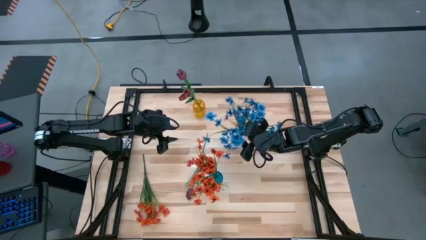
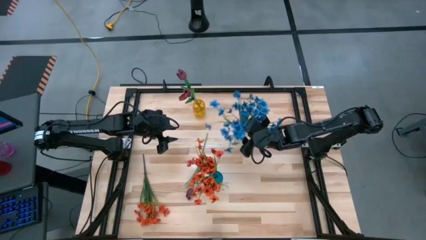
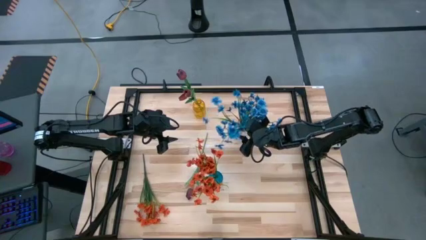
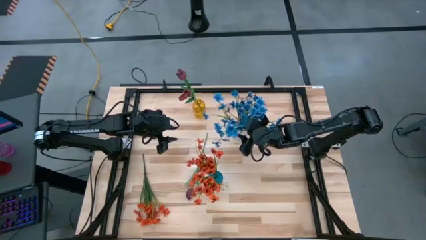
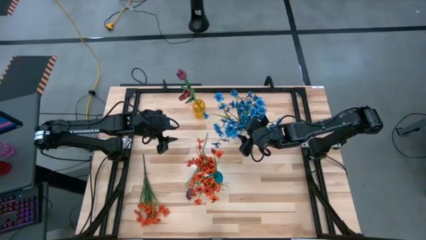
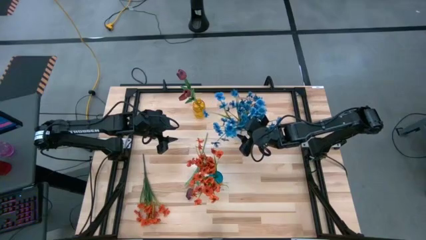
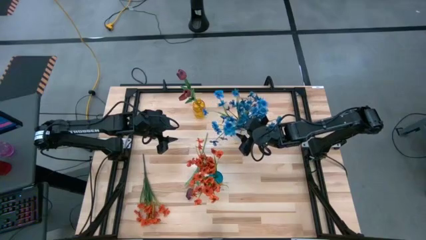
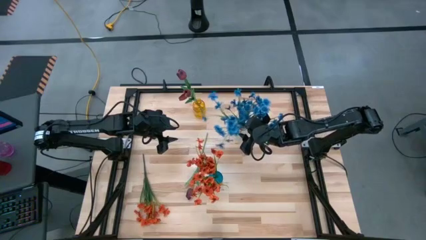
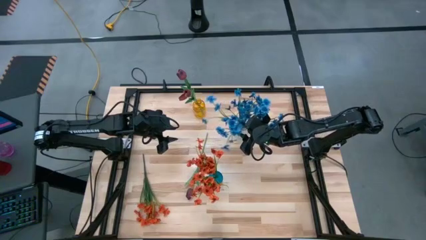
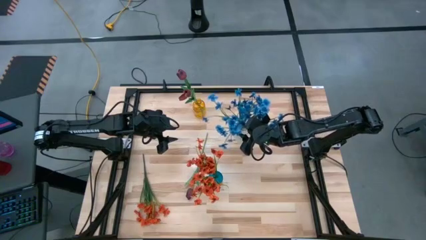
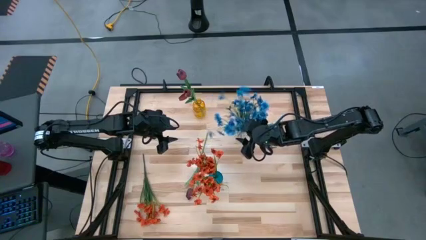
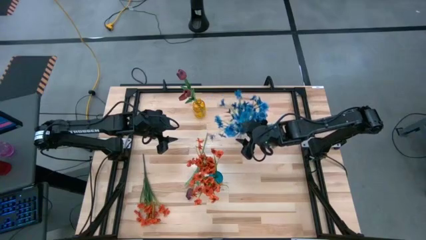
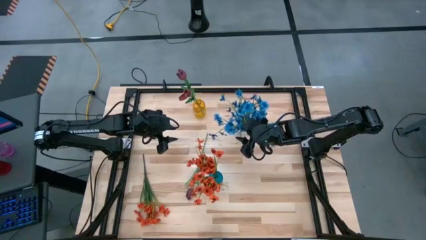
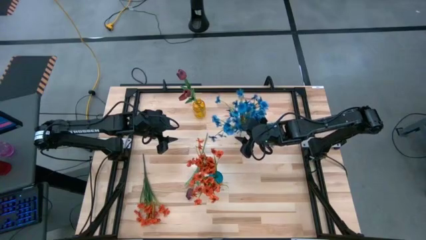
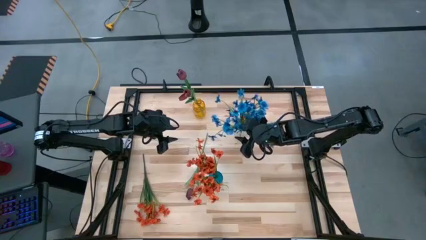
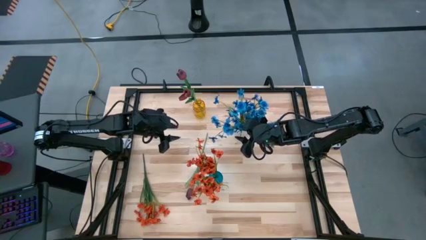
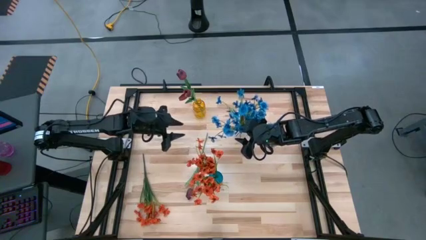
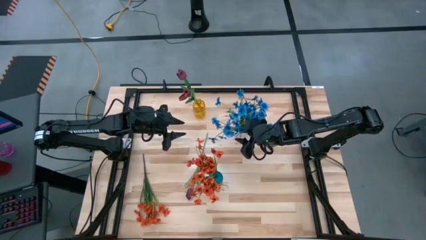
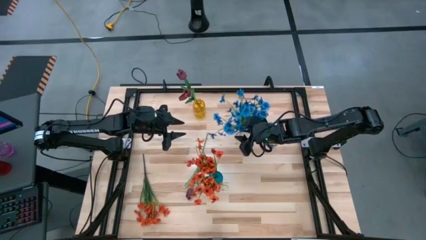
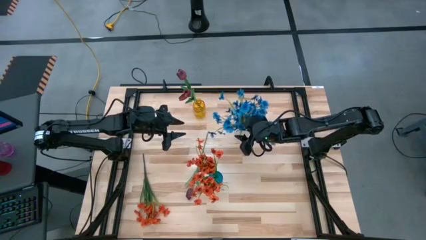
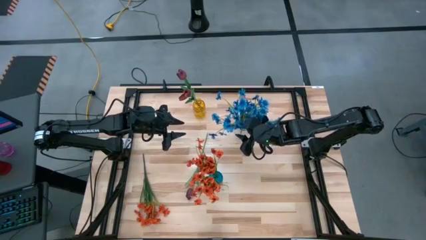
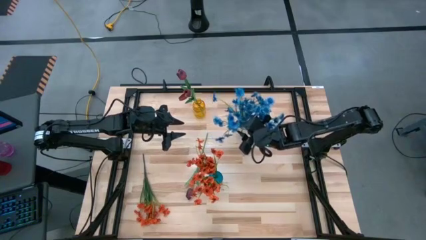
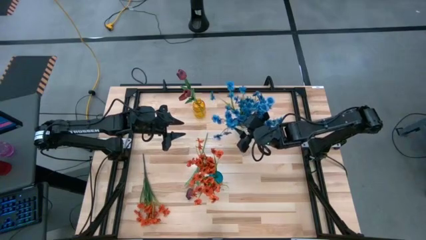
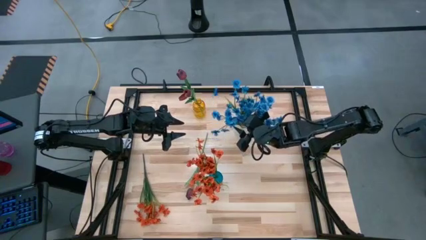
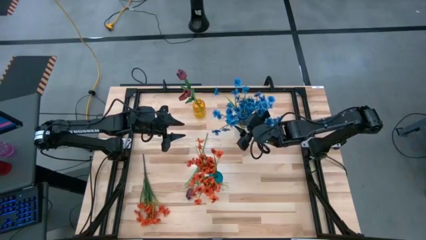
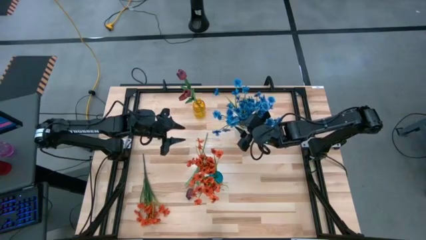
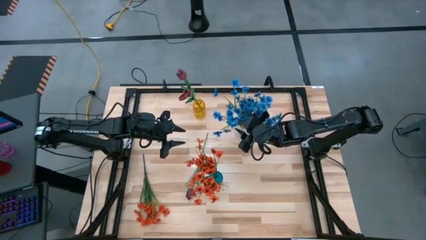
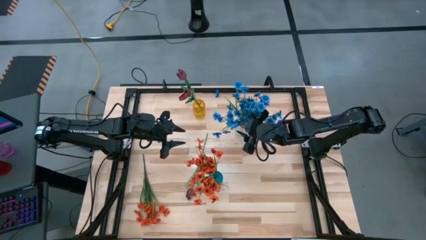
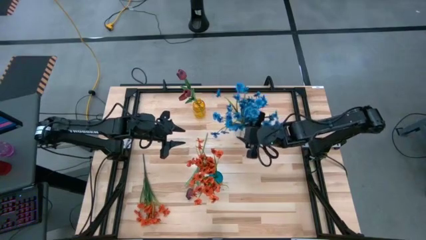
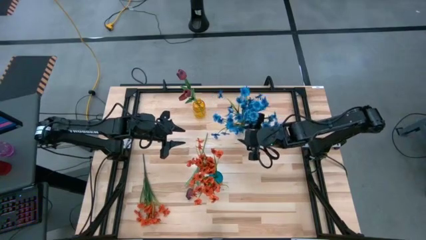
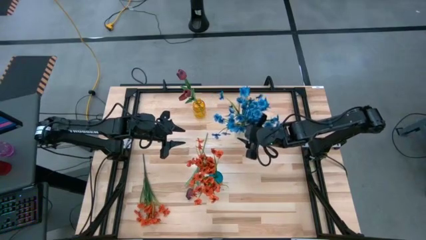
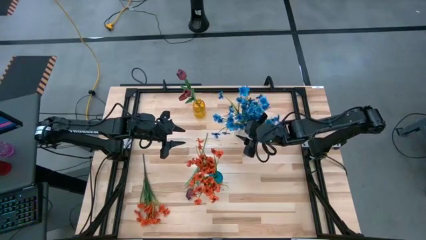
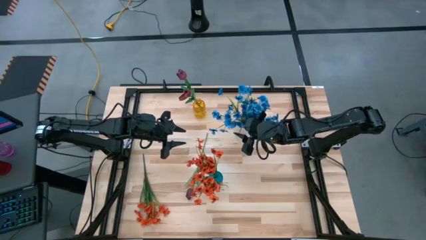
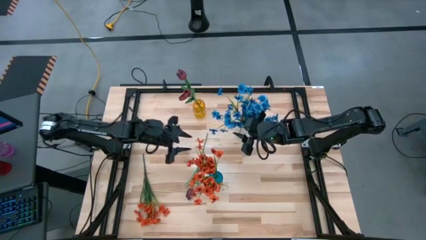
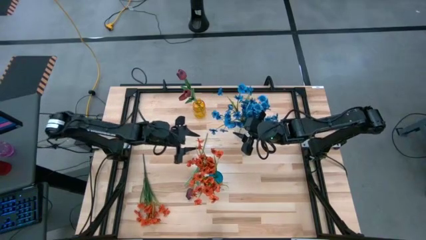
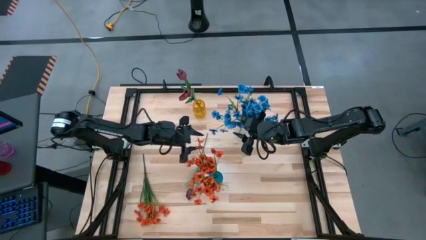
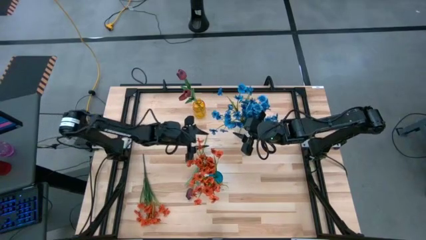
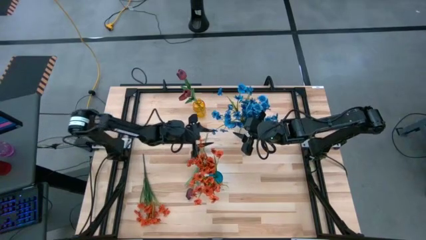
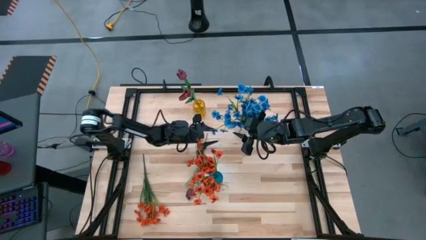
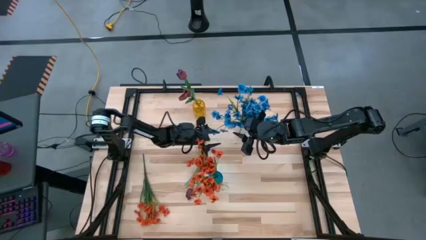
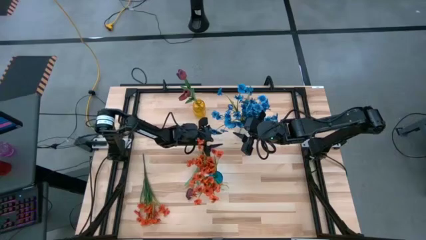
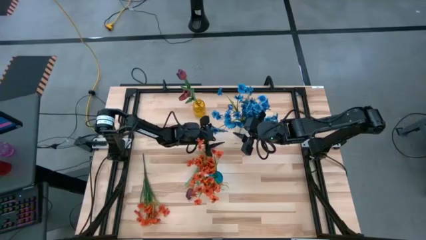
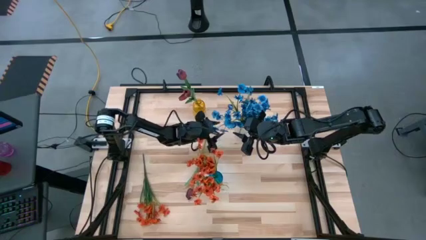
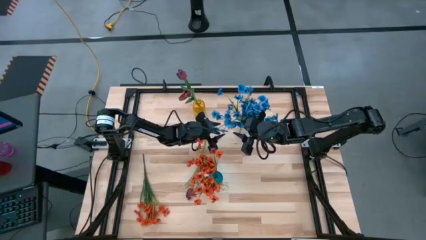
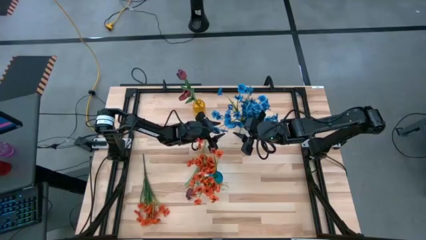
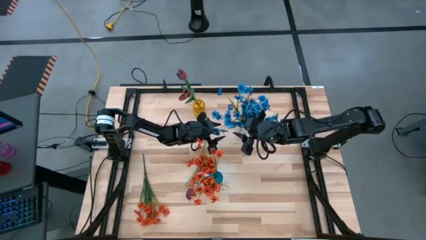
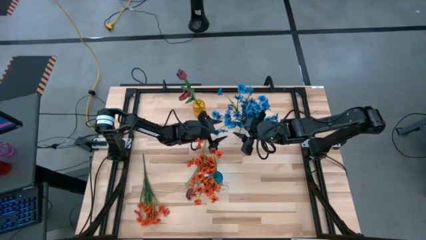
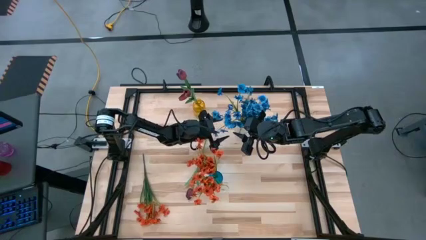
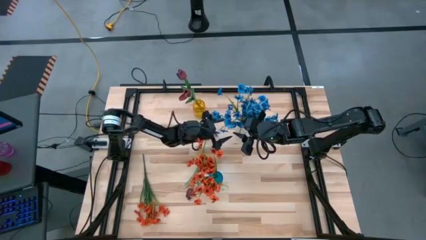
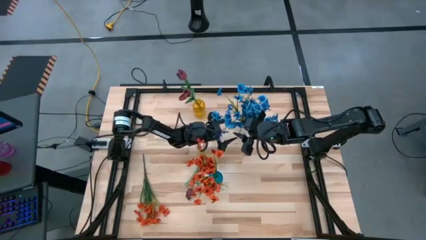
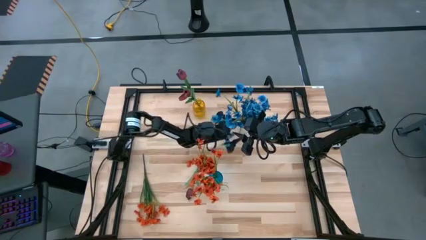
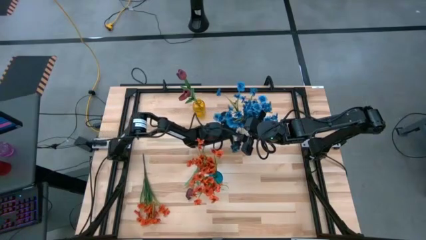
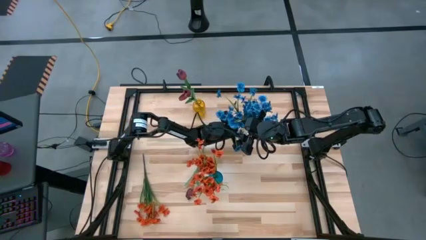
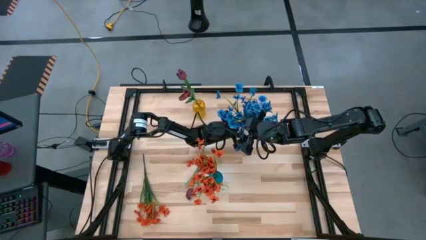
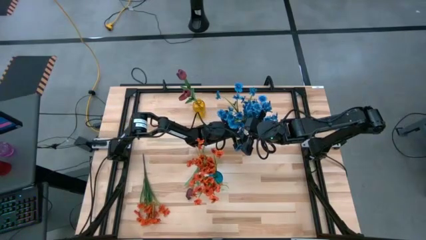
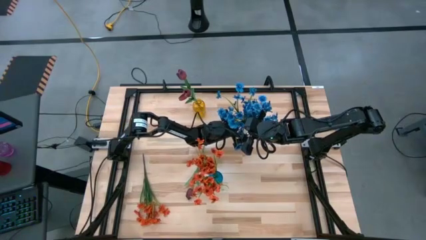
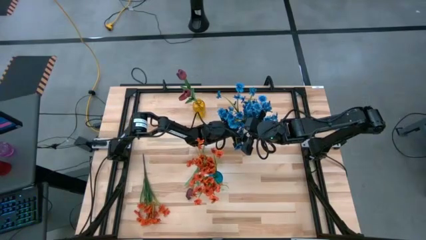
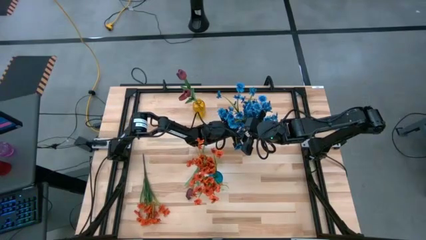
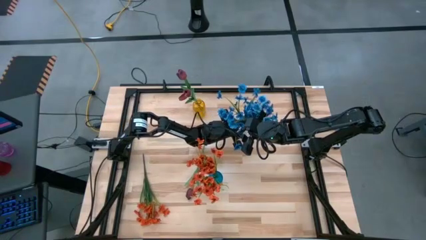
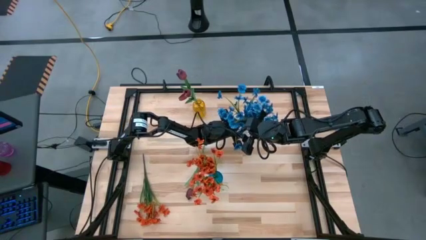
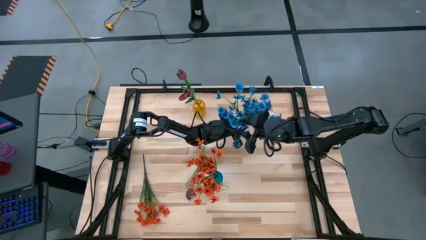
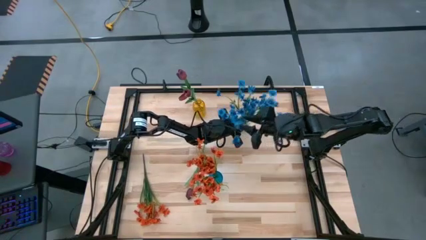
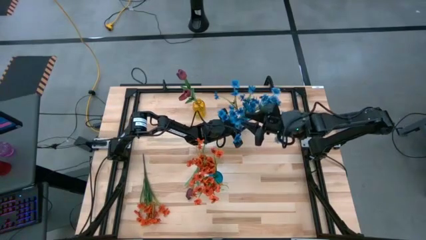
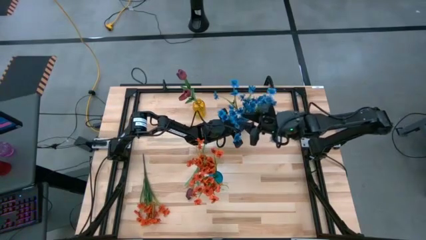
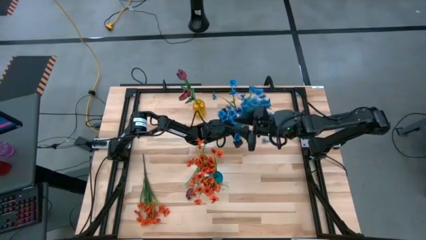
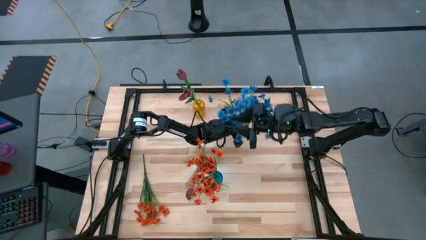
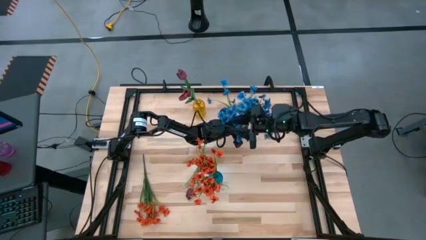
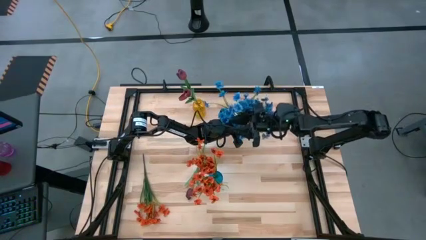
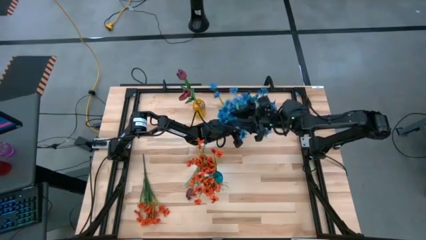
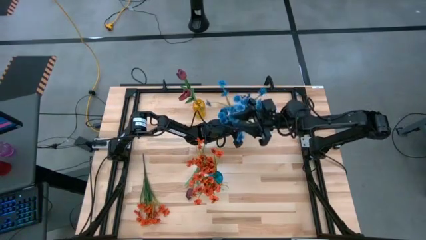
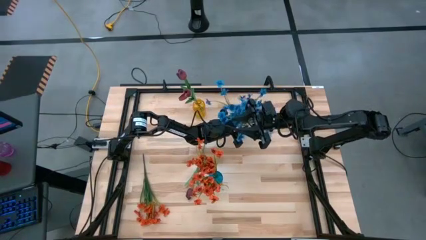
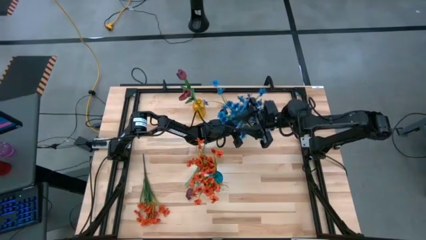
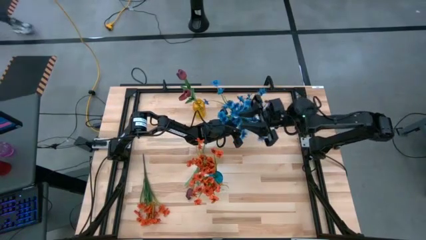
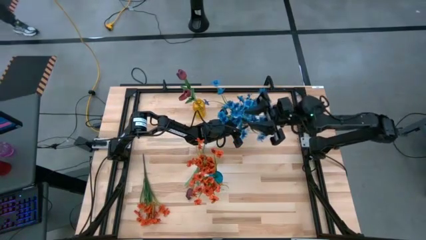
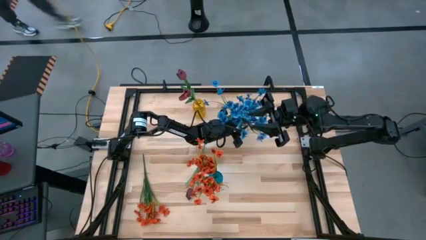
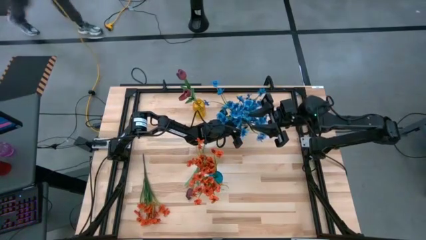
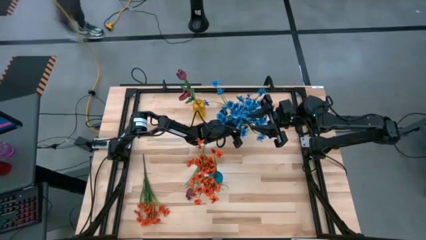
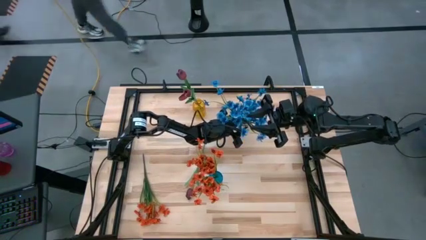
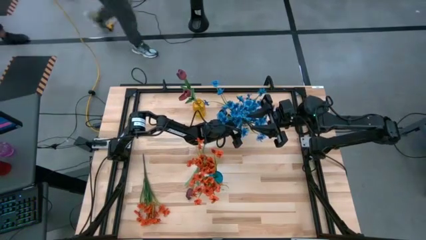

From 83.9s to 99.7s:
Task: Sort flowers into vase by color
Put the blue flowers into the transparent vase
